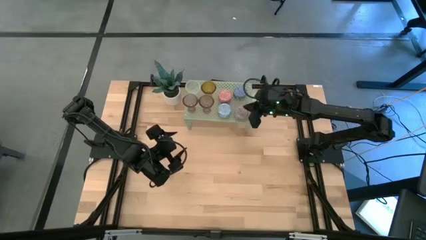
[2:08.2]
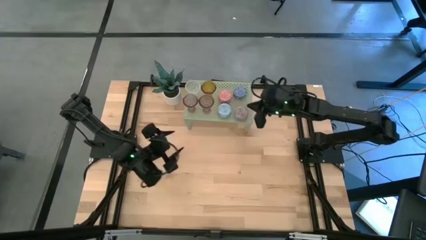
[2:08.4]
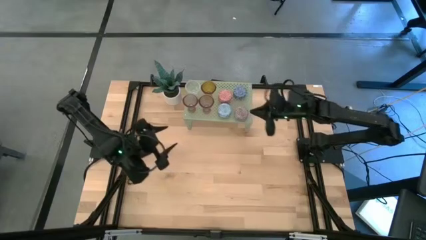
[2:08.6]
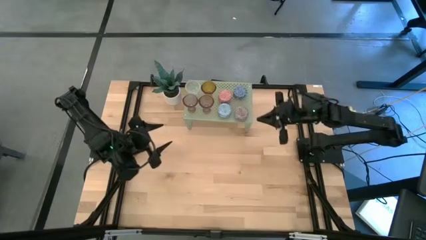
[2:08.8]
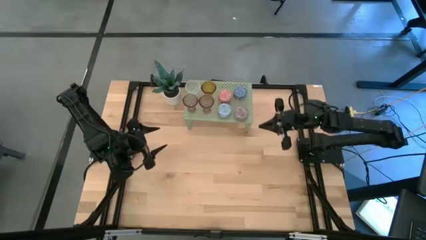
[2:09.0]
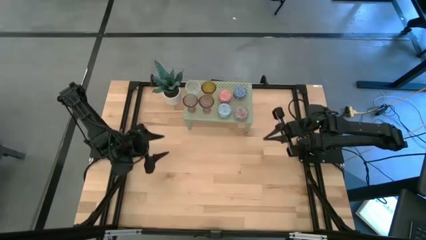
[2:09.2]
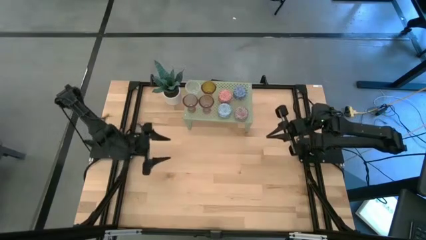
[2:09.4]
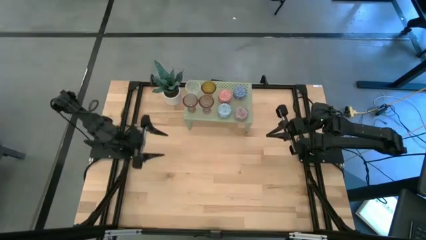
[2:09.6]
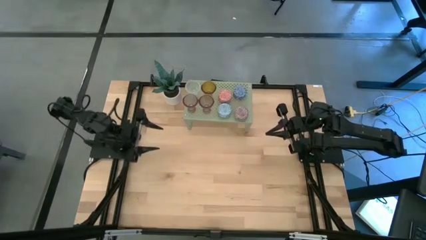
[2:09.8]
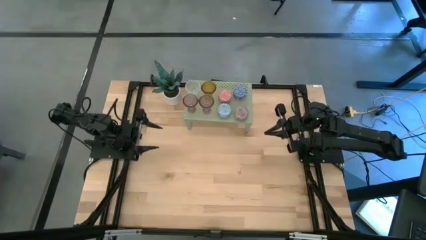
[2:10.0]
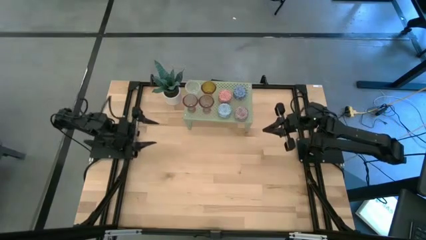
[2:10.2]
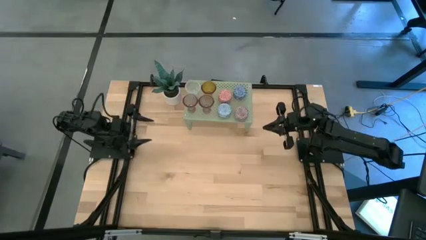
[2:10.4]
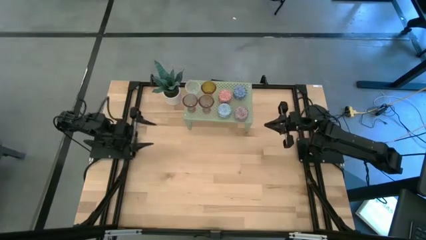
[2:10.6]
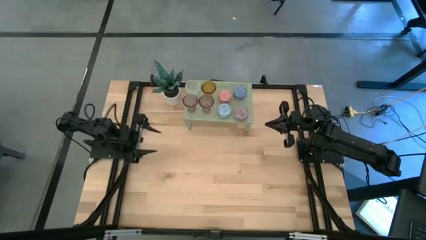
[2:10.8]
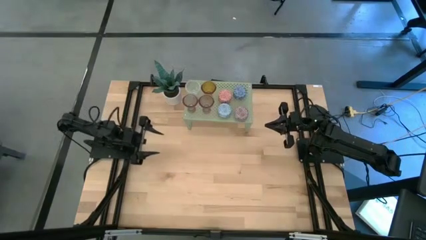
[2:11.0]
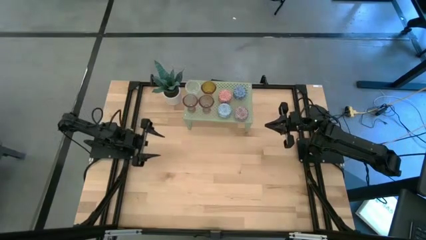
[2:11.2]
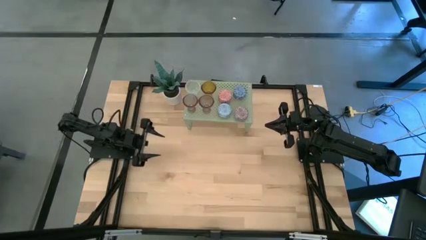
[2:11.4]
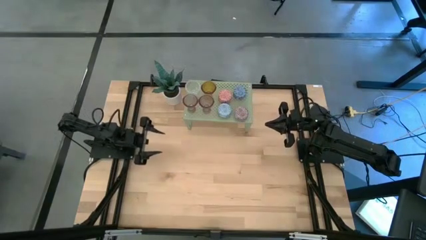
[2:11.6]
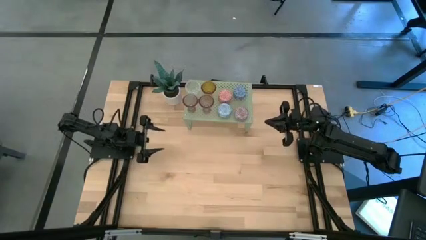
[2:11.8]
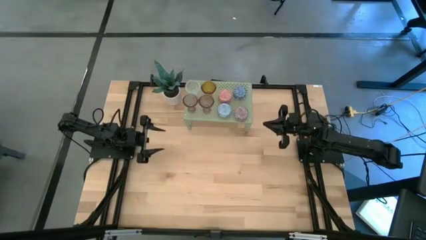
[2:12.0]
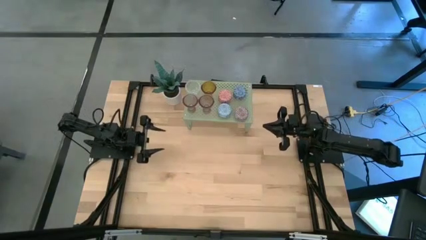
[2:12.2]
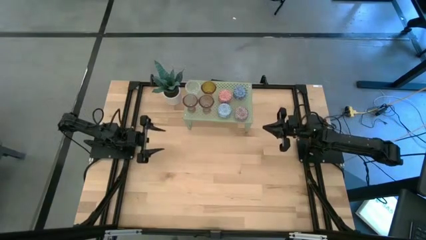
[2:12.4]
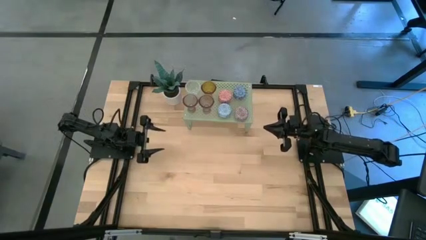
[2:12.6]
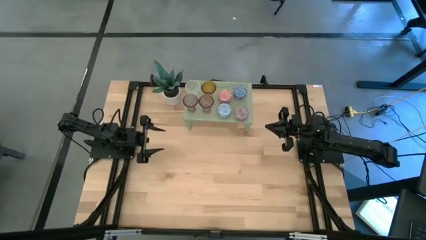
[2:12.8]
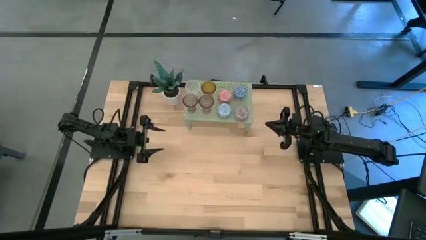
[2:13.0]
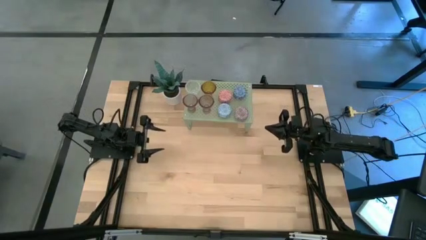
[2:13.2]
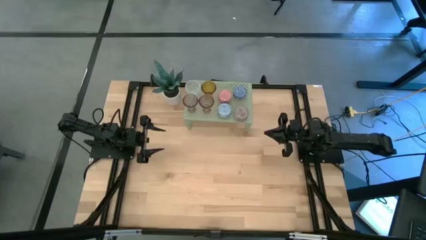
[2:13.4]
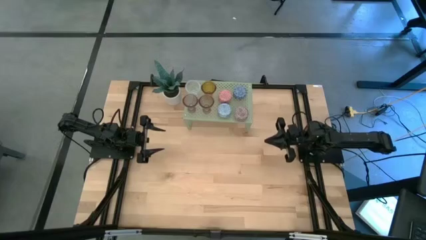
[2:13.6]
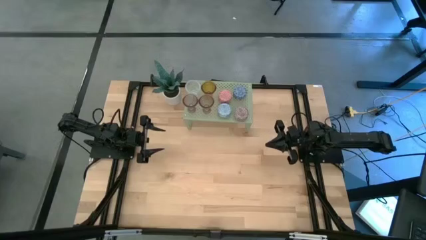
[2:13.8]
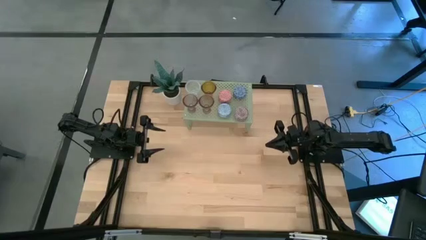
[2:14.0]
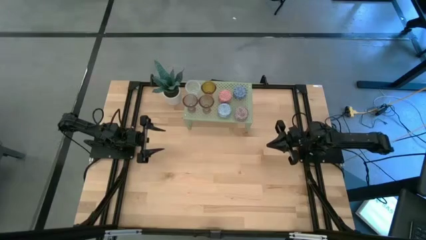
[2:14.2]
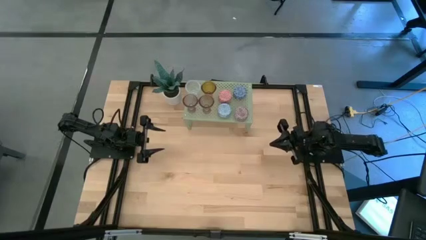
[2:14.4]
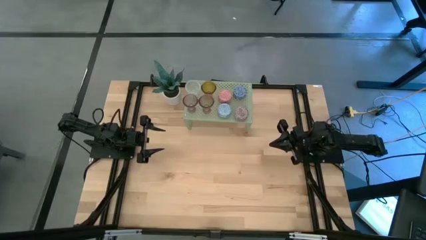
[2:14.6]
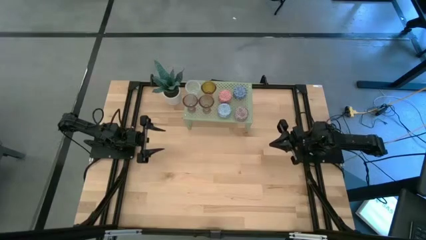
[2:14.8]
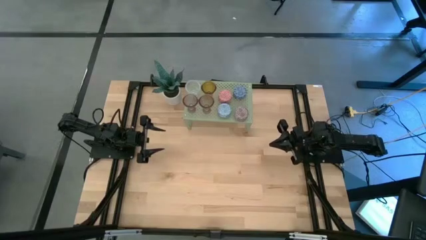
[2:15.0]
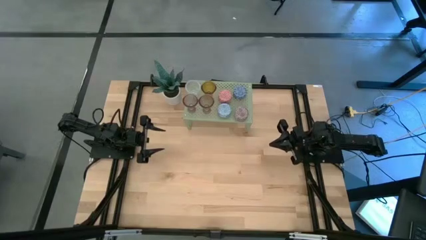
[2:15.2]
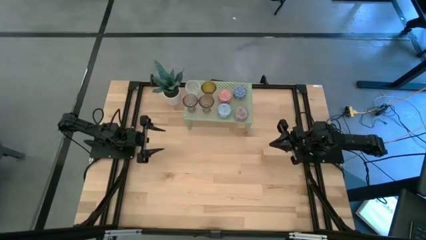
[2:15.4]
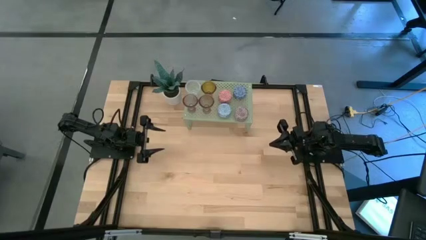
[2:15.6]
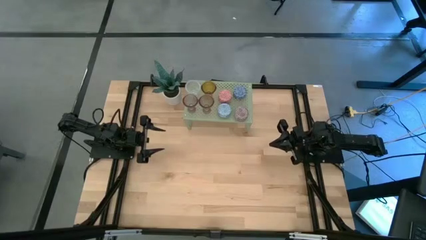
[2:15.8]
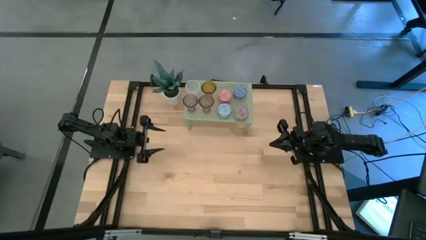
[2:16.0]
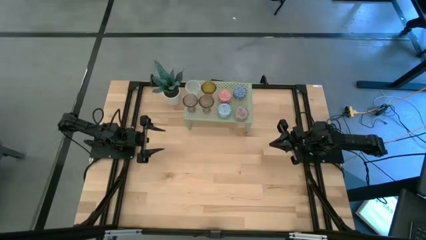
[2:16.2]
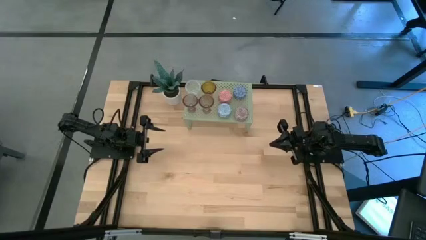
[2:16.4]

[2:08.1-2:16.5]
Task: Pick & Place candle stick holders
Return to Home Position

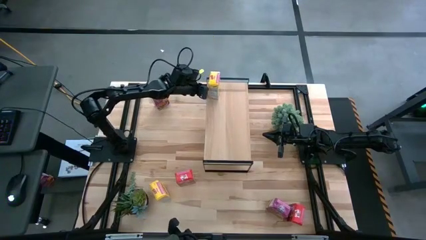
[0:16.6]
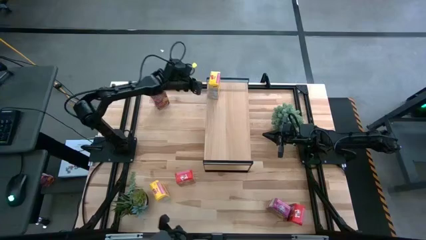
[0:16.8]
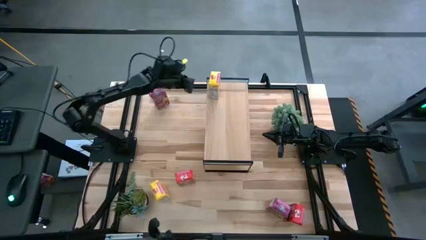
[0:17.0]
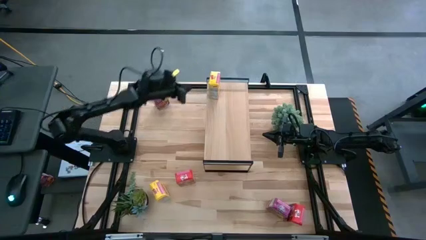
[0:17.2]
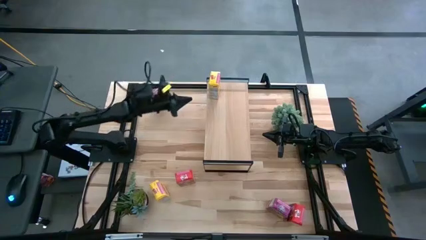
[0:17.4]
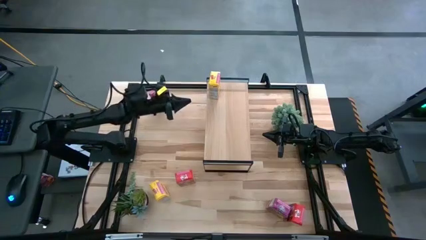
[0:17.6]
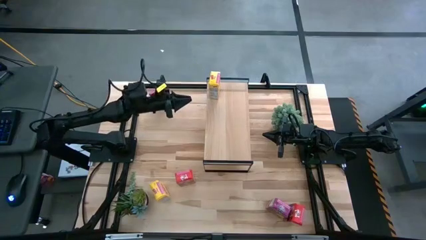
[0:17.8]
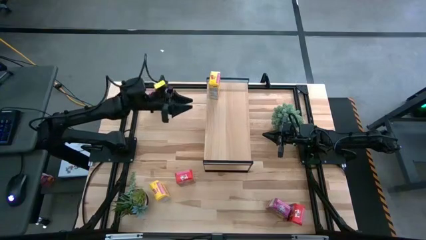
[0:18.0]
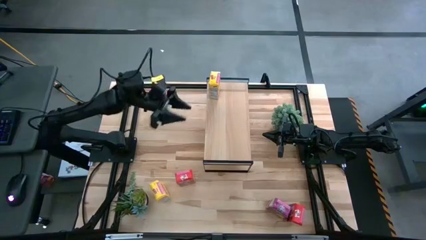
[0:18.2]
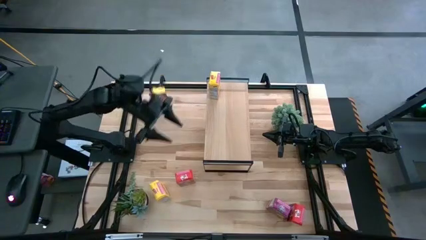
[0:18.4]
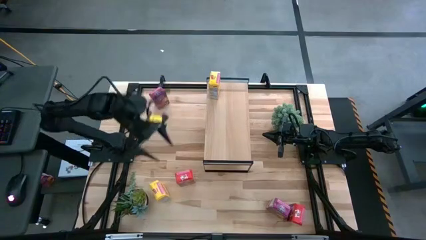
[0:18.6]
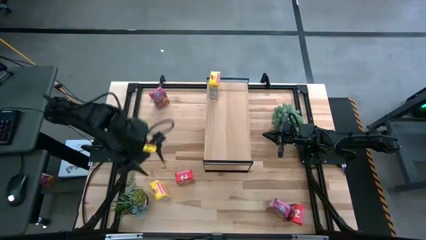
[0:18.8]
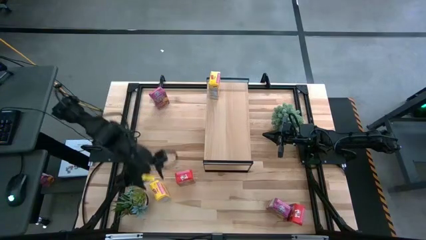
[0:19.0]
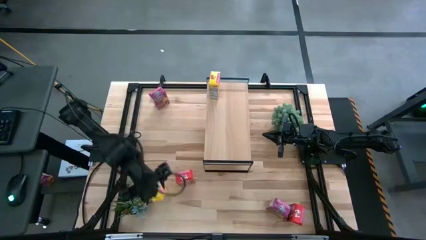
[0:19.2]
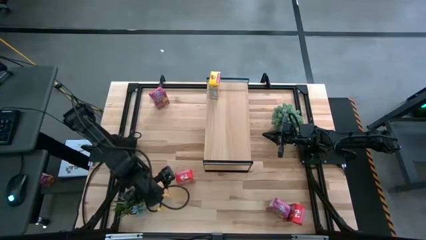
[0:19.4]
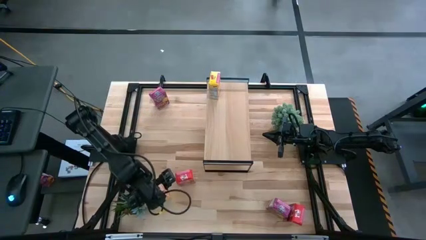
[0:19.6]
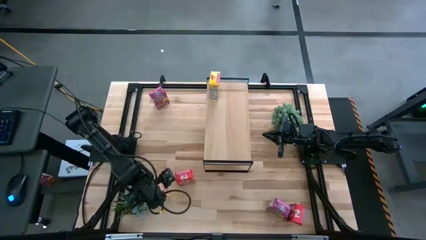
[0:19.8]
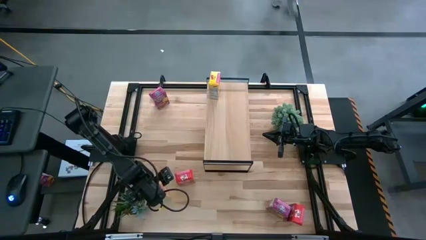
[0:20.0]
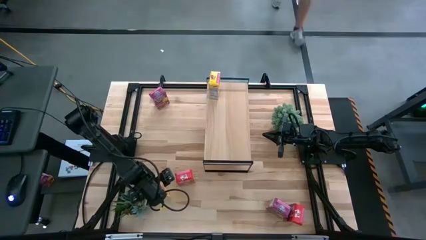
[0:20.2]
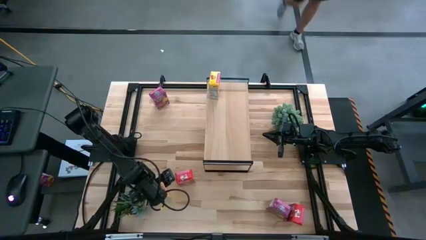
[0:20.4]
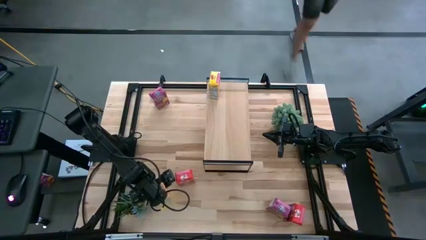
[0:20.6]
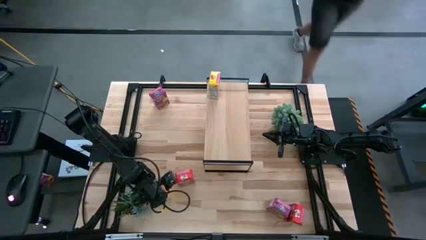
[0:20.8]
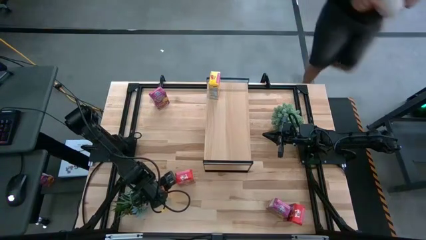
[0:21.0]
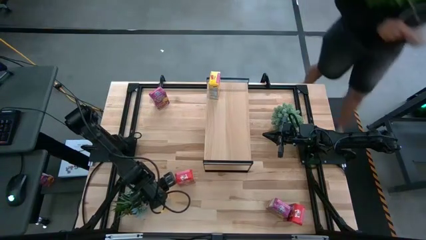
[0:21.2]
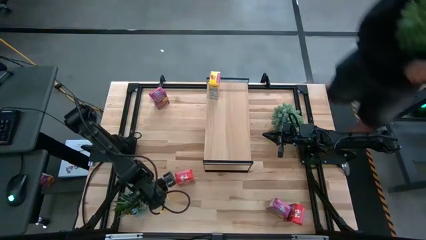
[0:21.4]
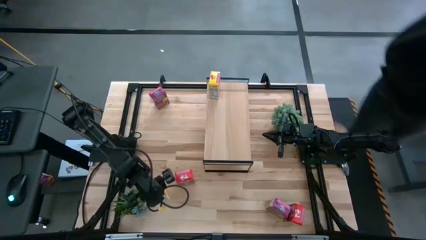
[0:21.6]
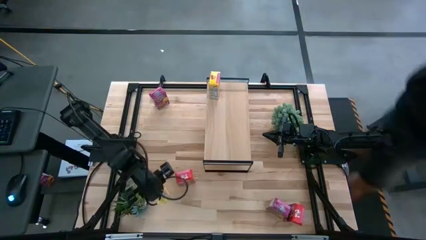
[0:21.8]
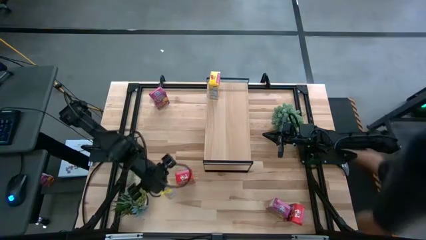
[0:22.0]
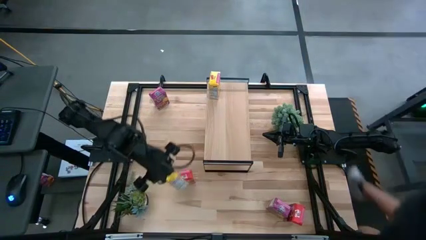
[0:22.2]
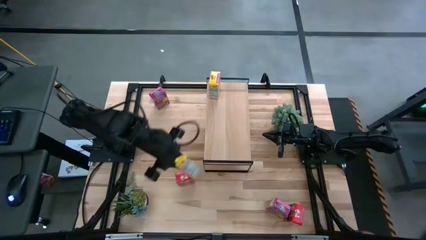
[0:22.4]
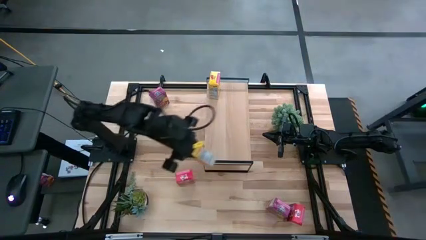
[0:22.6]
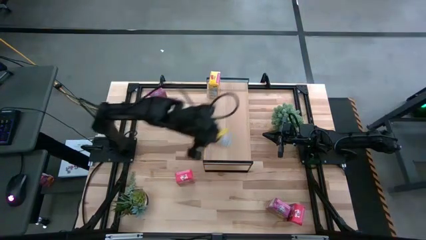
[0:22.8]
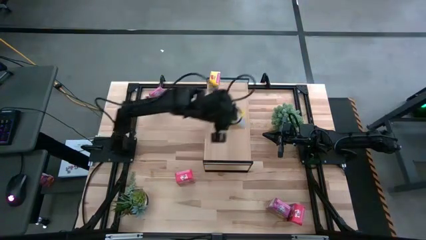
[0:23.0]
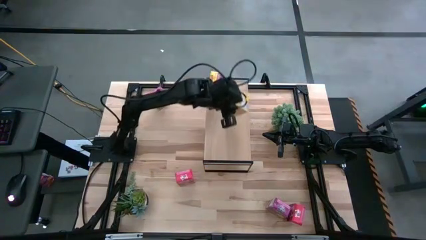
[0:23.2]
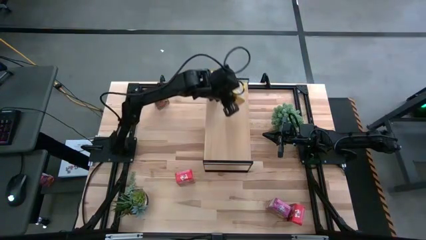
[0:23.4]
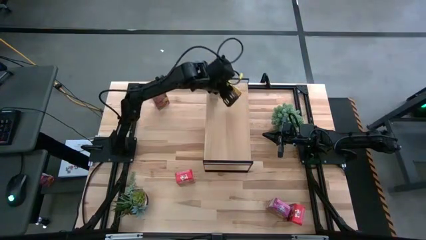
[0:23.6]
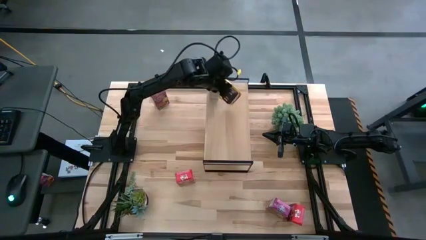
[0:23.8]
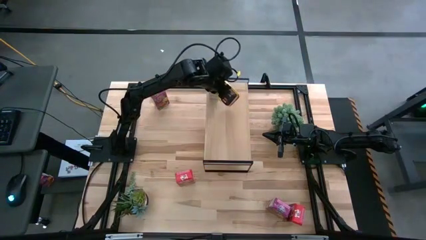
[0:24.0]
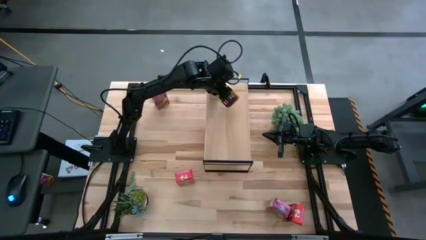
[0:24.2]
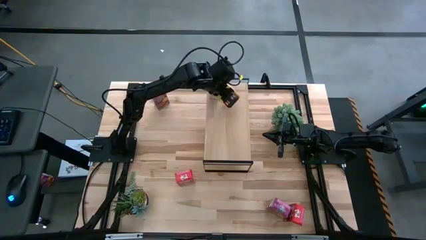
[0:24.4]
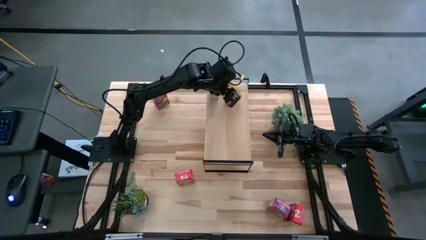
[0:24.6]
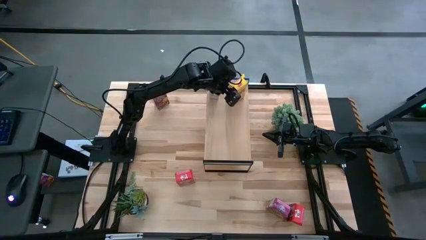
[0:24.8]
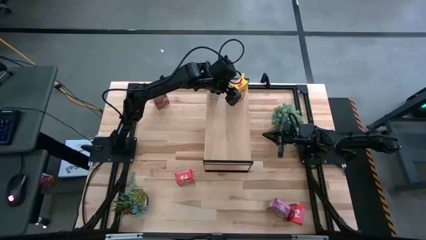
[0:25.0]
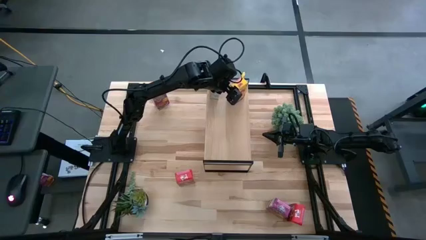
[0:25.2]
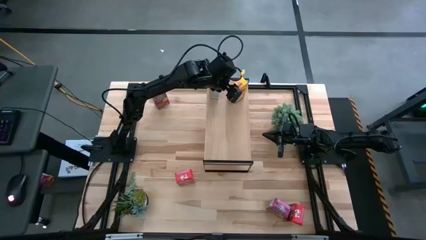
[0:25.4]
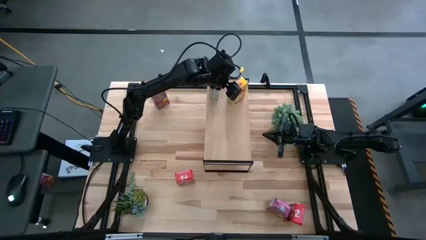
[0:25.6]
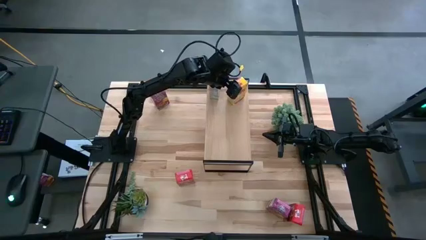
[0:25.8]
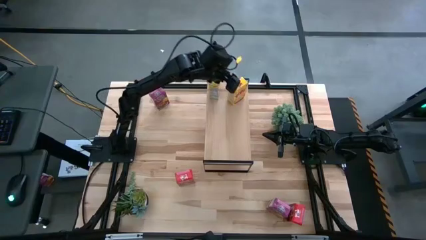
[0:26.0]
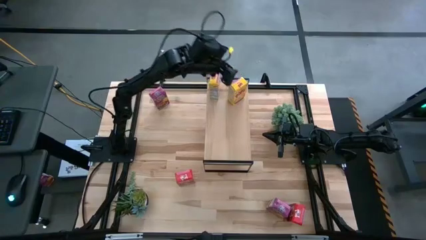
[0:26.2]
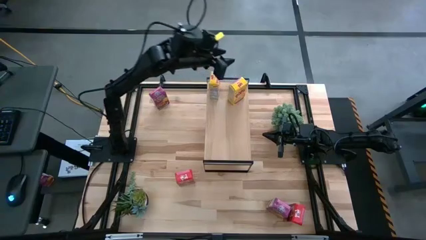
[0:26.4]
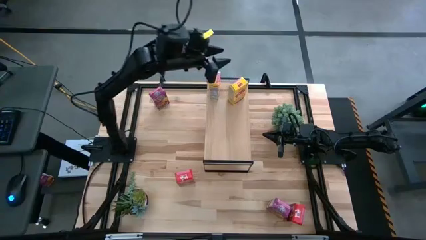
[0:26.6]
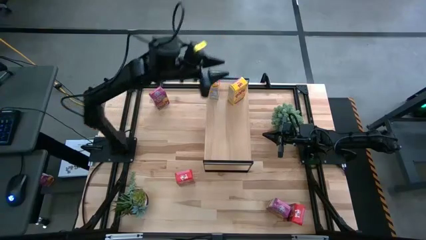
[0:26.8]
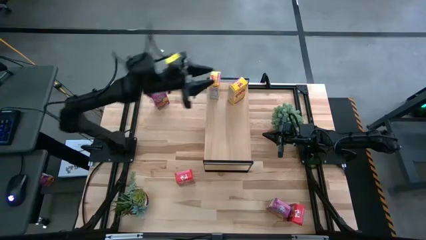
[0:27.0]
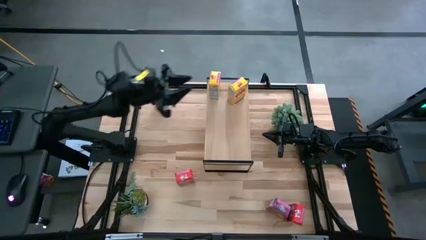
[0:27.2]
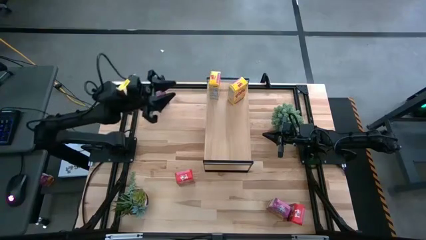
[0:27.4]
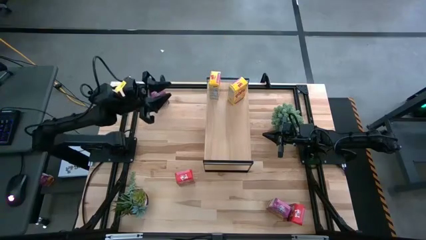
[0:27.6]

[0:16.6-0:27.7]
Task: Stack cereal on shelf
Align the yellow cereal box with the other yellow cereal box on the shelf
